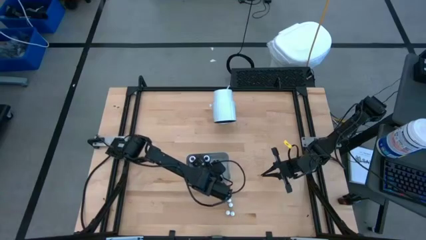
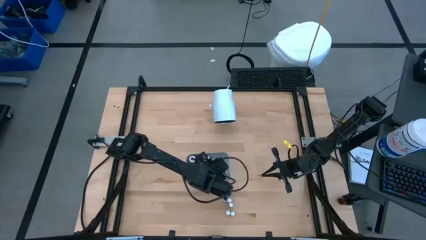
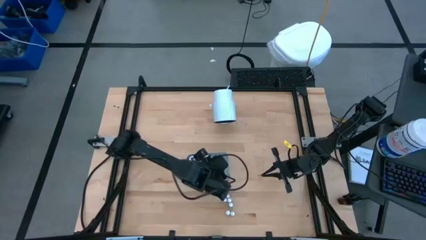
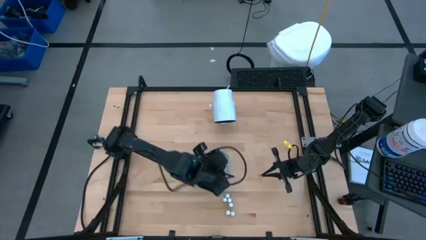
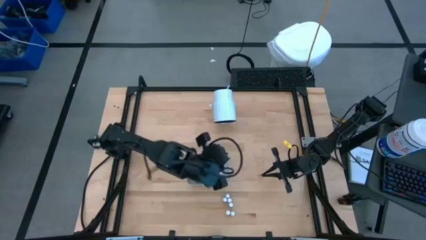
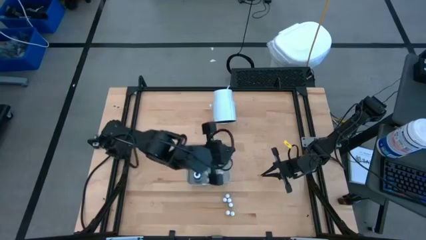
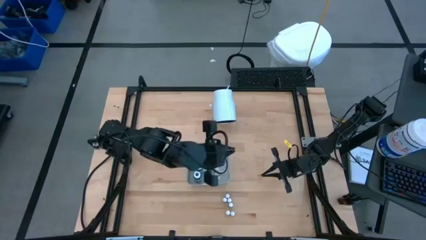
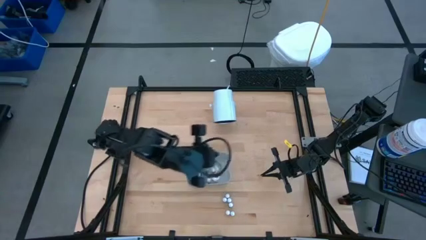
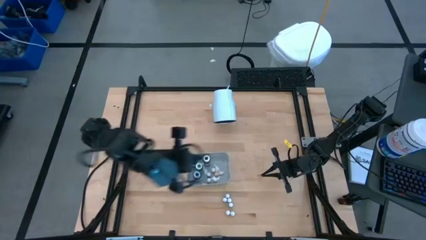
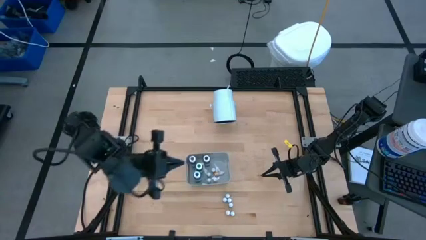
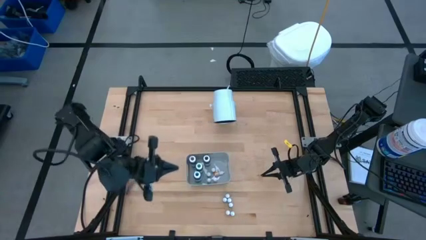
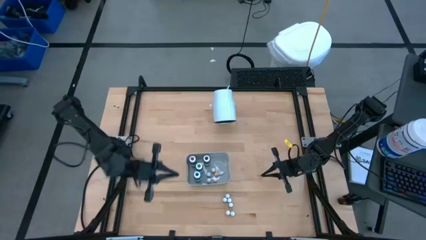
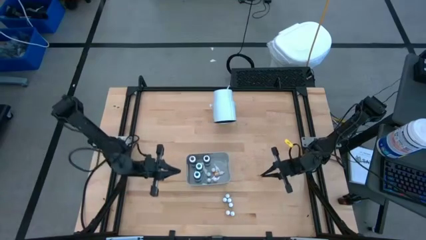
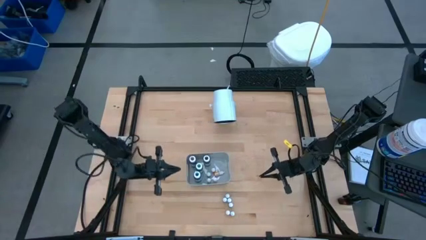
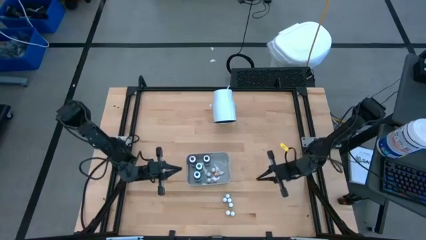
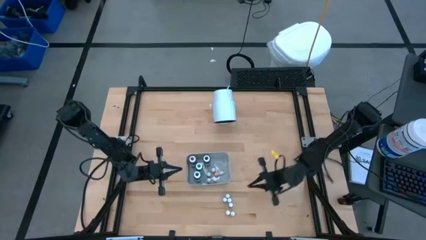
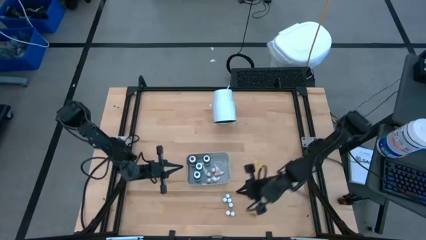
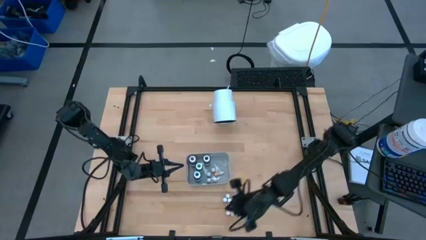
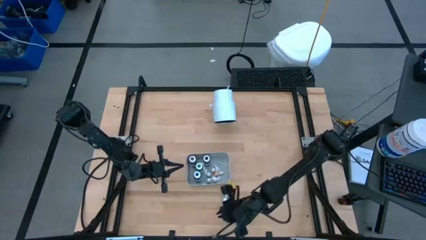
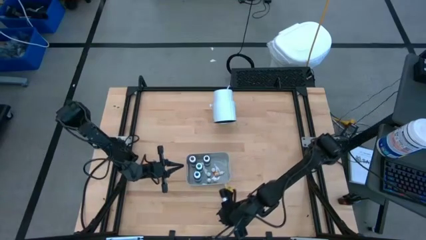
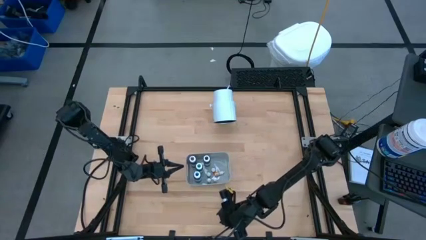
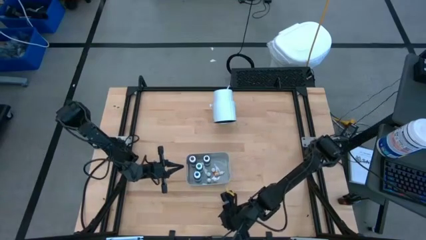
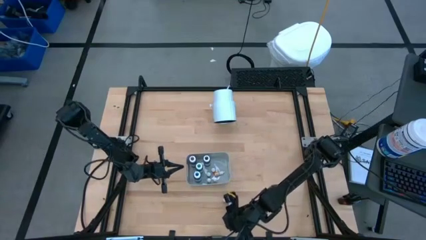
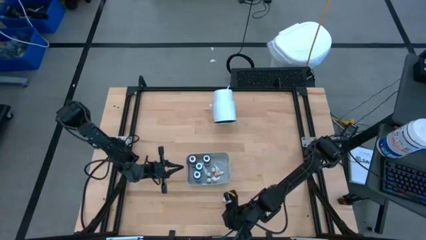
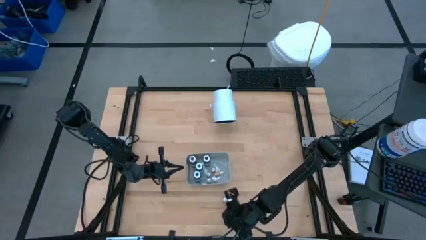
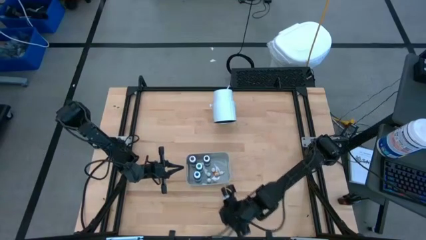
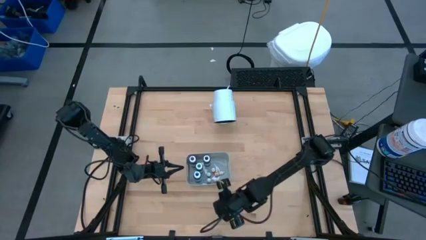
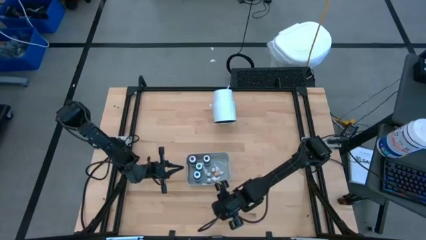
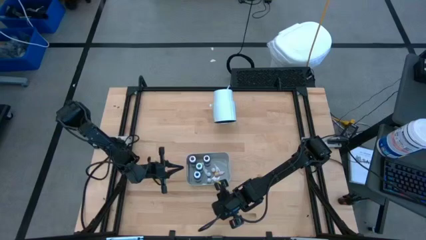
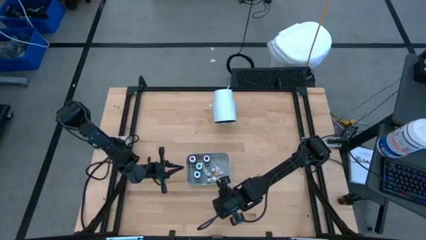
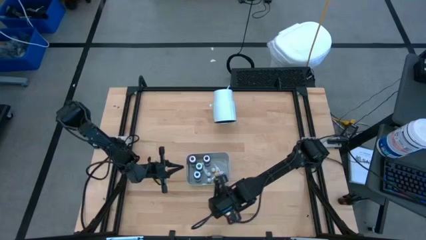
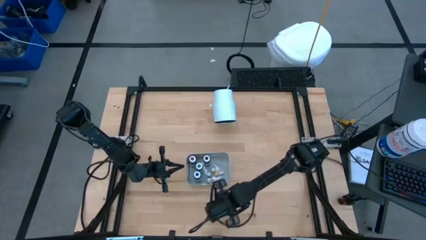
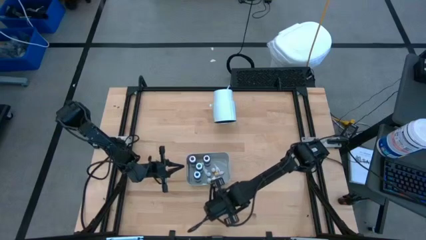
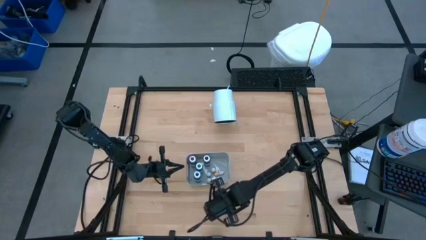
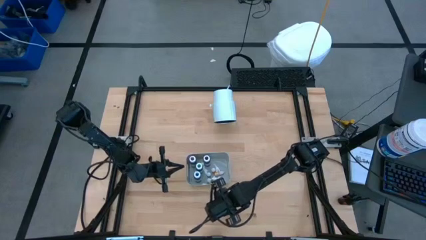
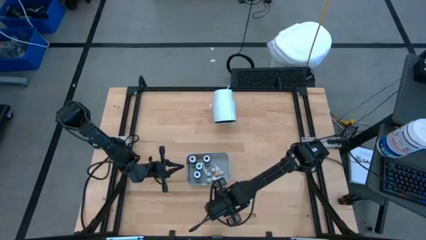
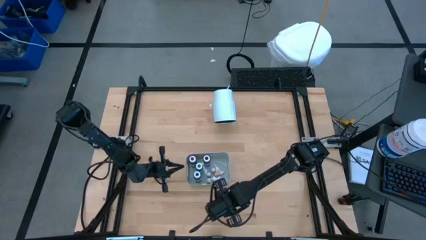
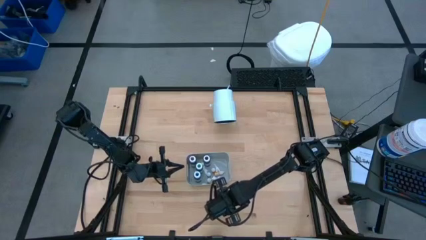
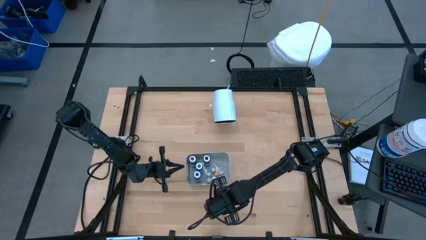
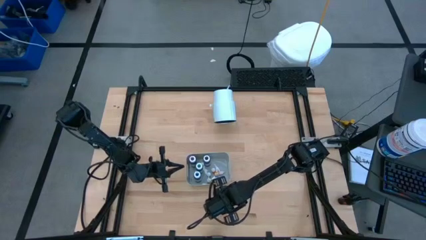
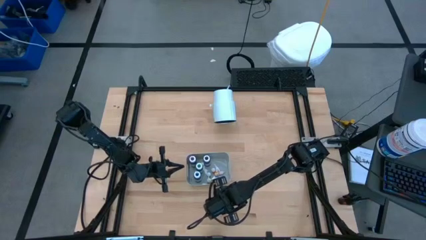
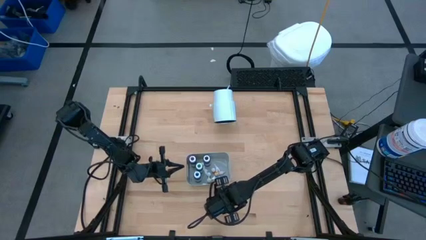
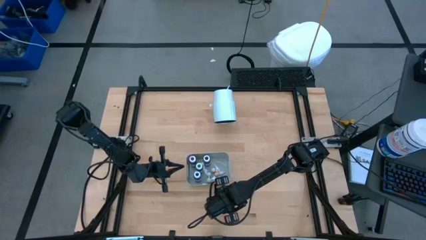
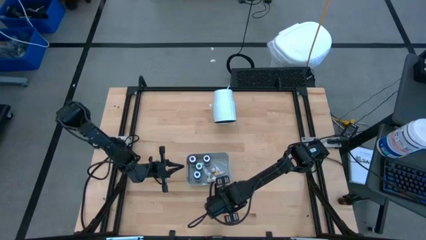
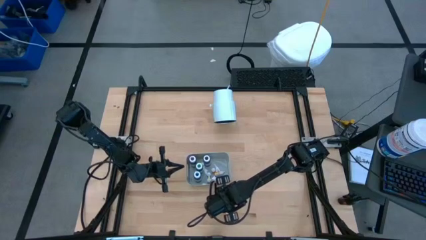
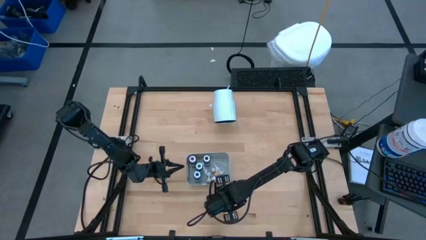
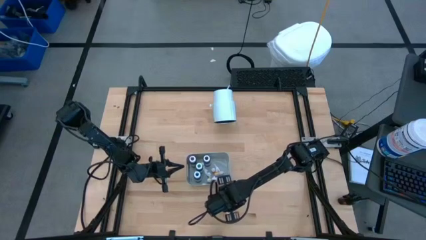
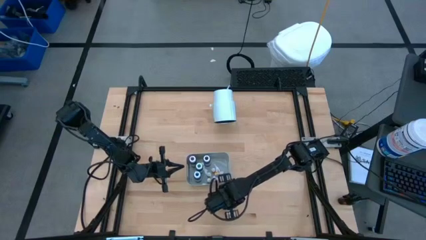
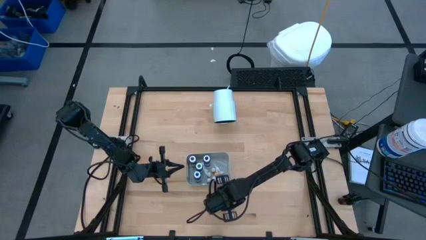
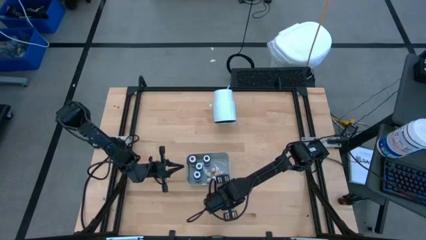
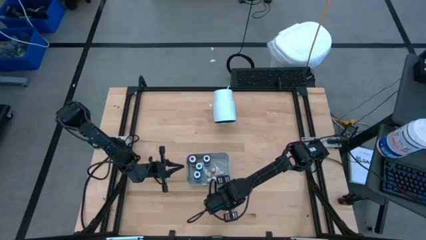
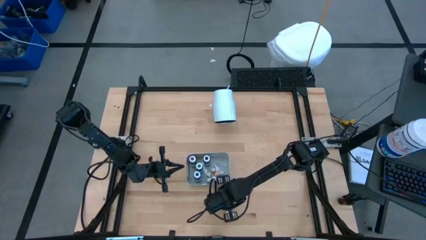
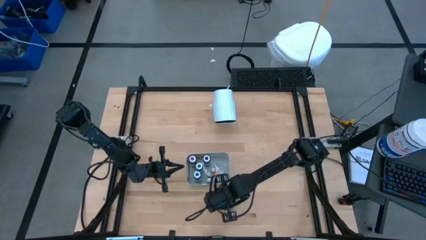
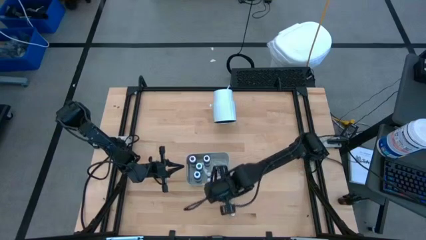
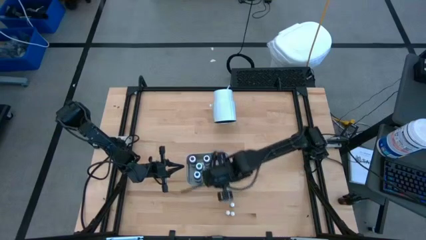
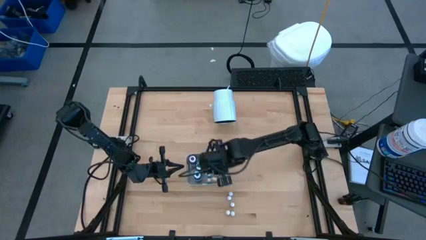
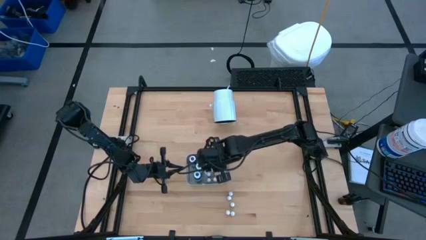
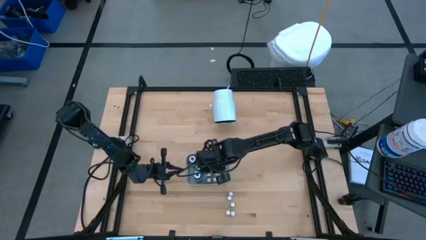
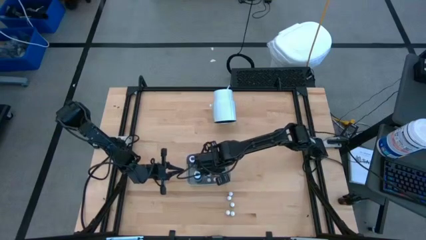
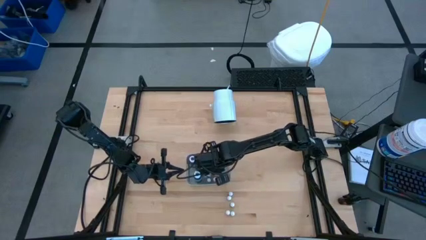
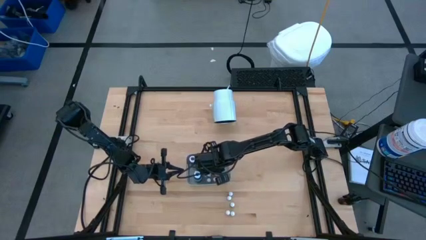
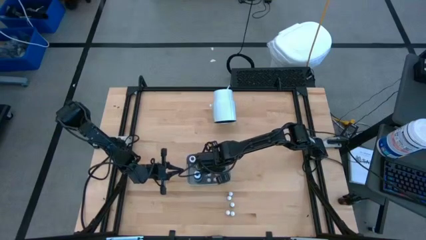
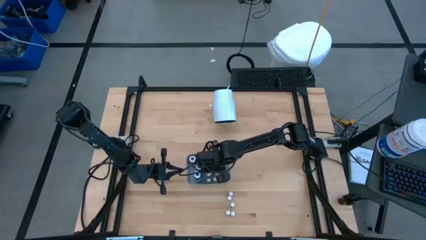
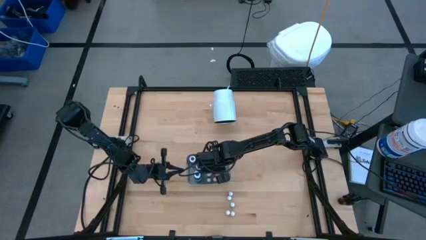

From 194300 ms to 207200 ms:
Task: Pick & Place food coloring
Put the red food coloring bottle into the gray bin
